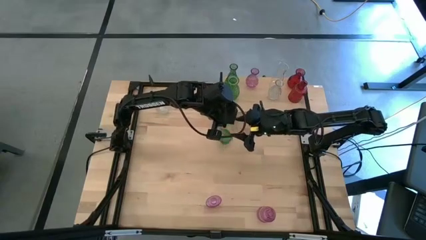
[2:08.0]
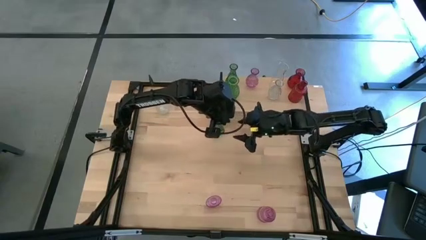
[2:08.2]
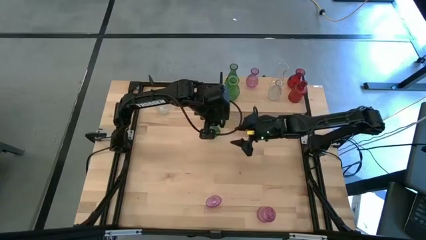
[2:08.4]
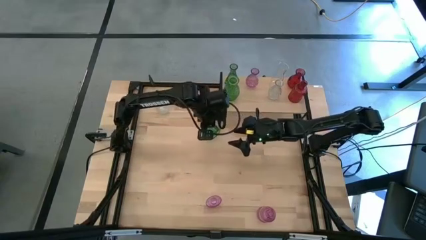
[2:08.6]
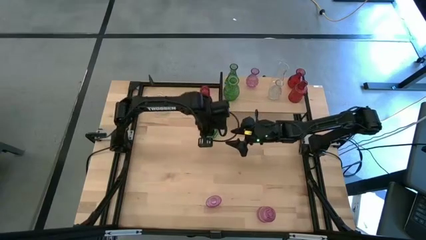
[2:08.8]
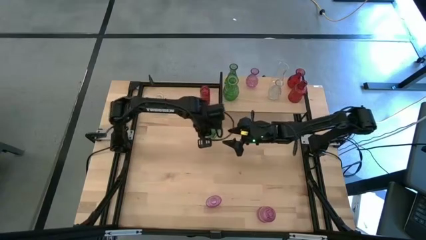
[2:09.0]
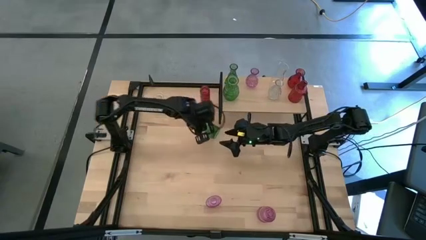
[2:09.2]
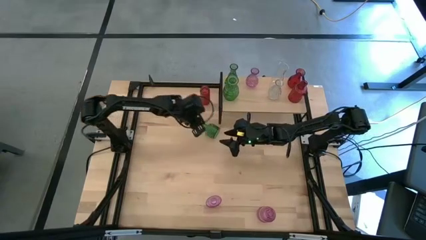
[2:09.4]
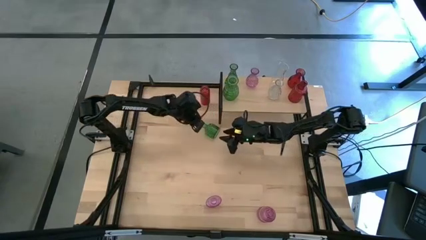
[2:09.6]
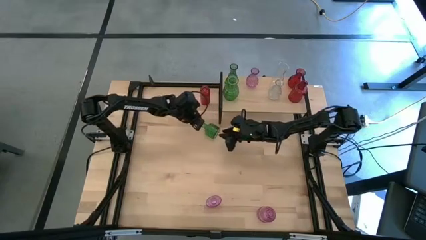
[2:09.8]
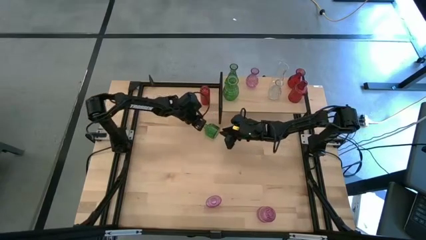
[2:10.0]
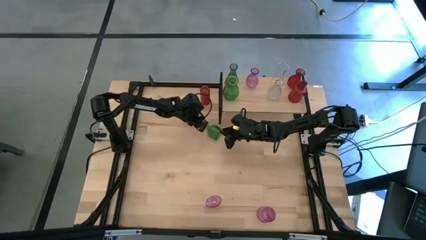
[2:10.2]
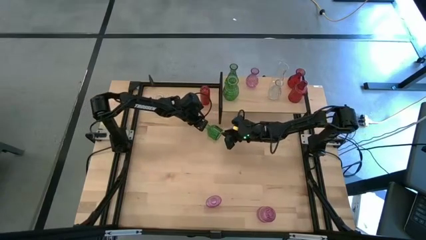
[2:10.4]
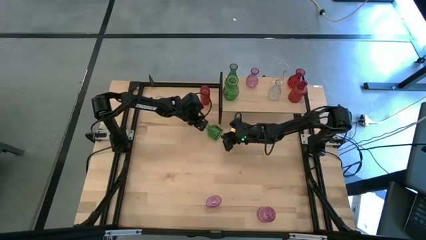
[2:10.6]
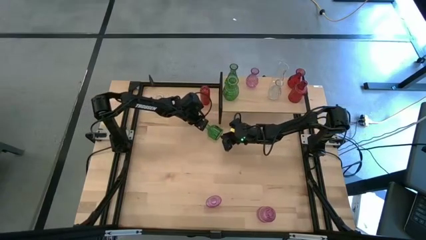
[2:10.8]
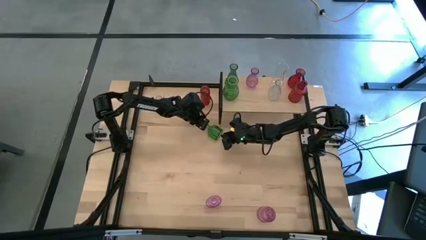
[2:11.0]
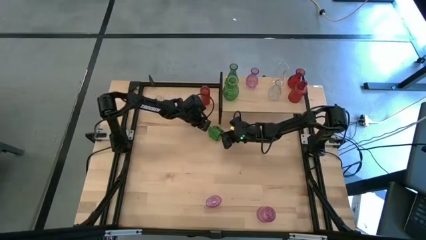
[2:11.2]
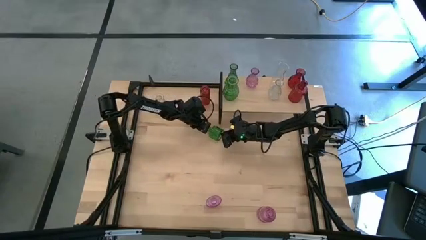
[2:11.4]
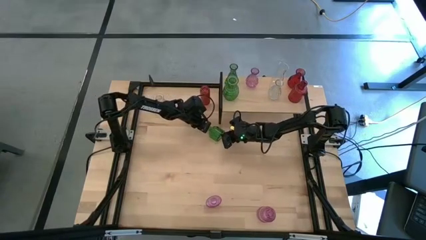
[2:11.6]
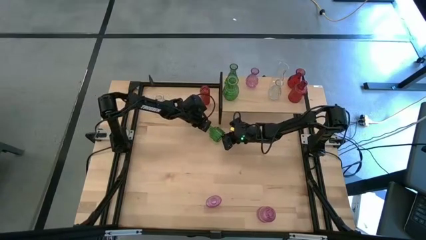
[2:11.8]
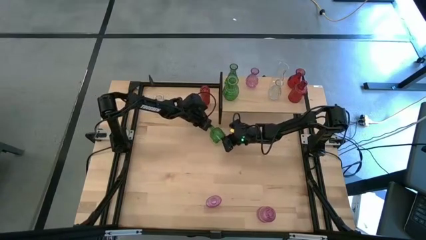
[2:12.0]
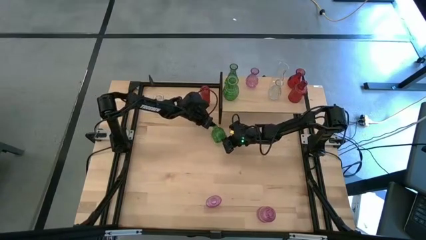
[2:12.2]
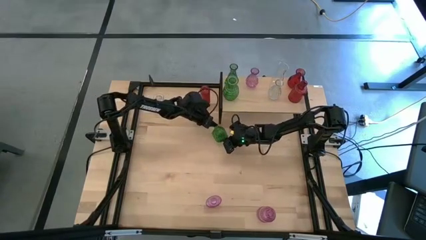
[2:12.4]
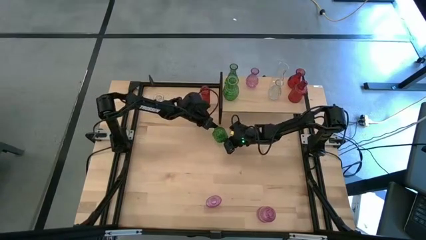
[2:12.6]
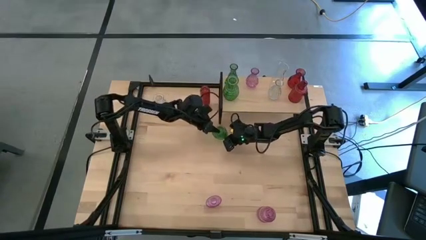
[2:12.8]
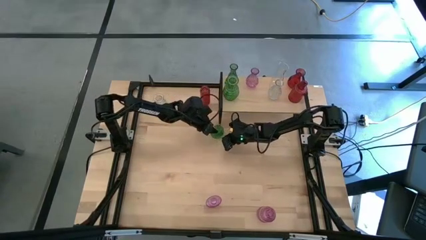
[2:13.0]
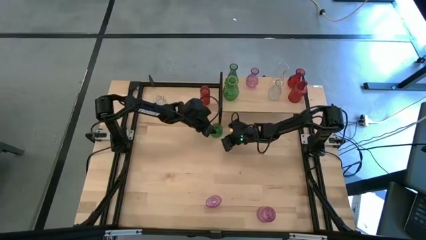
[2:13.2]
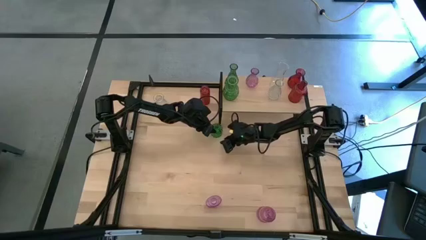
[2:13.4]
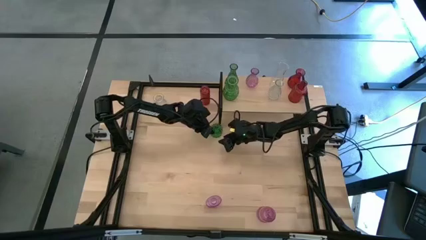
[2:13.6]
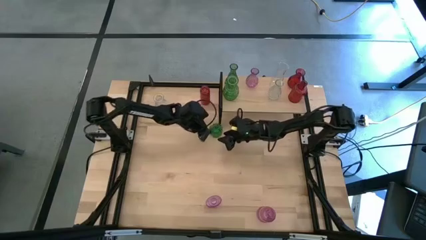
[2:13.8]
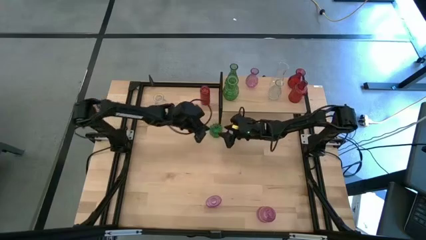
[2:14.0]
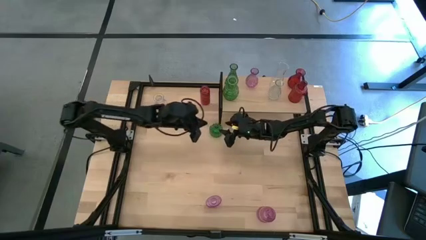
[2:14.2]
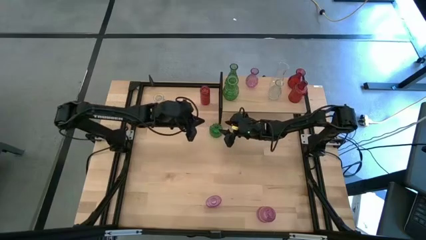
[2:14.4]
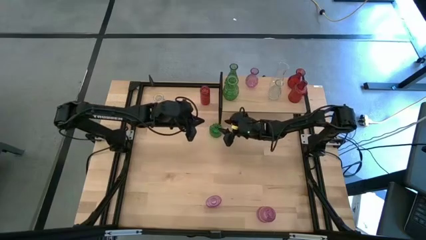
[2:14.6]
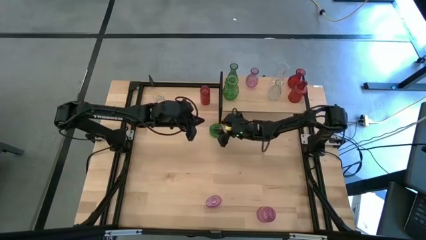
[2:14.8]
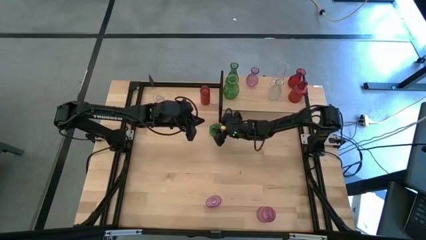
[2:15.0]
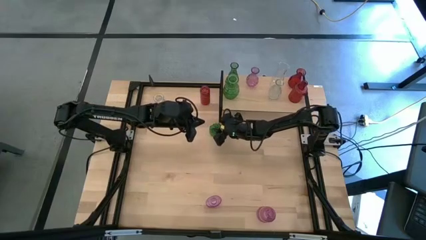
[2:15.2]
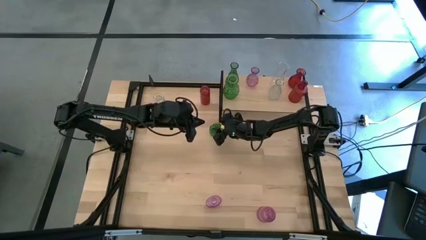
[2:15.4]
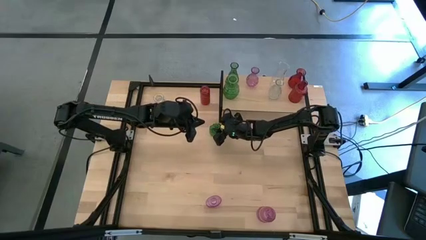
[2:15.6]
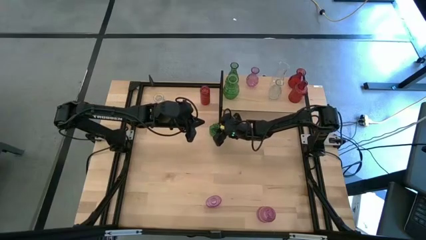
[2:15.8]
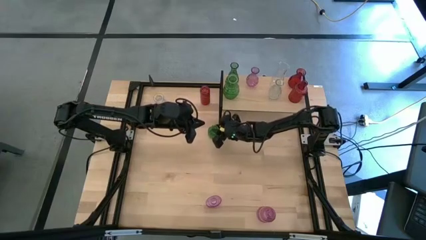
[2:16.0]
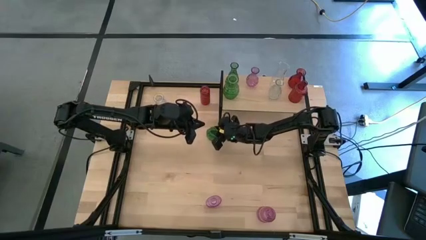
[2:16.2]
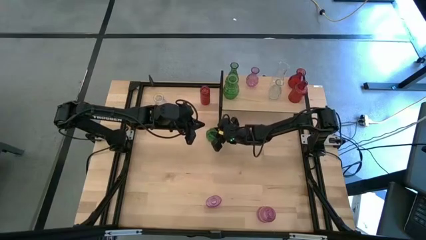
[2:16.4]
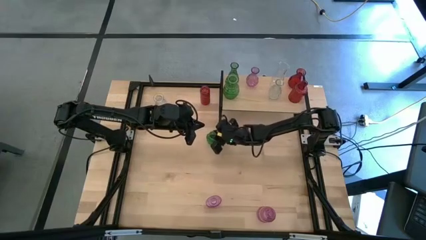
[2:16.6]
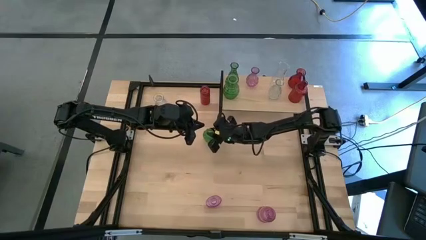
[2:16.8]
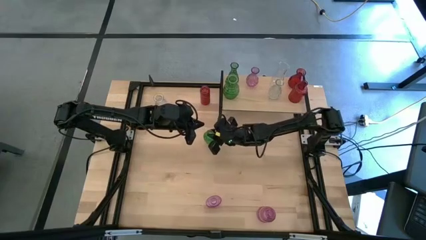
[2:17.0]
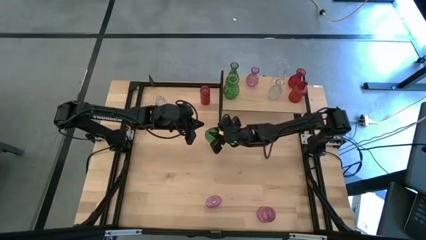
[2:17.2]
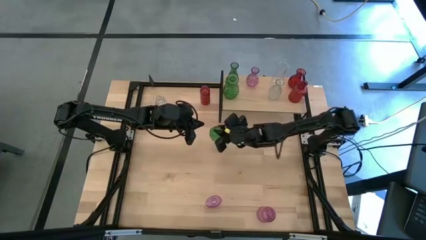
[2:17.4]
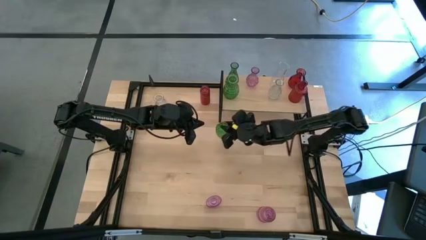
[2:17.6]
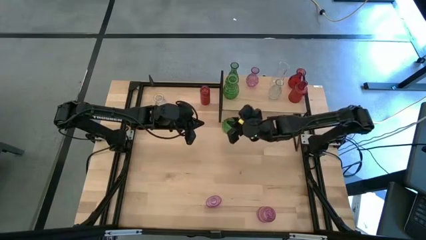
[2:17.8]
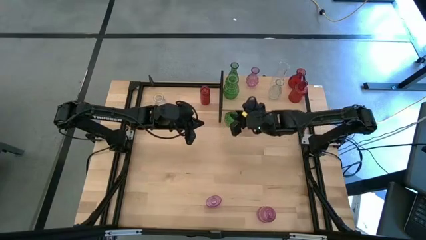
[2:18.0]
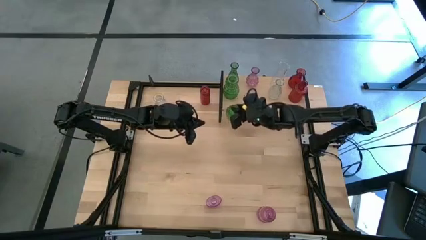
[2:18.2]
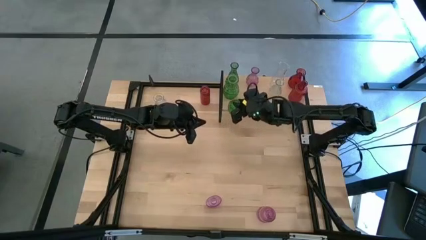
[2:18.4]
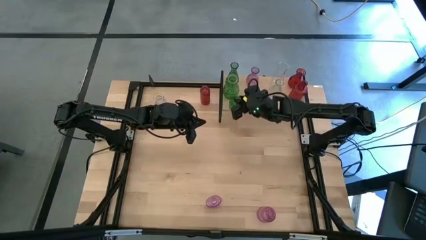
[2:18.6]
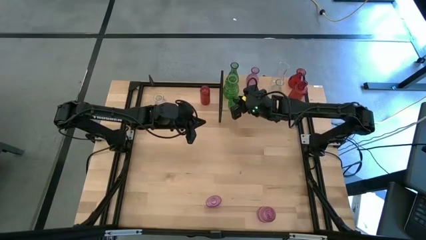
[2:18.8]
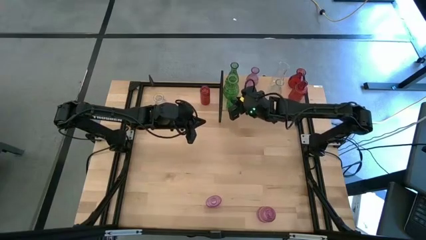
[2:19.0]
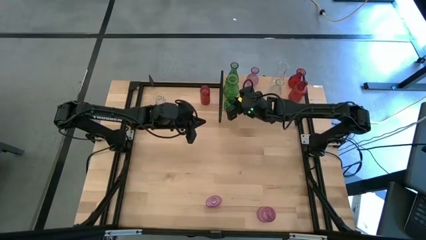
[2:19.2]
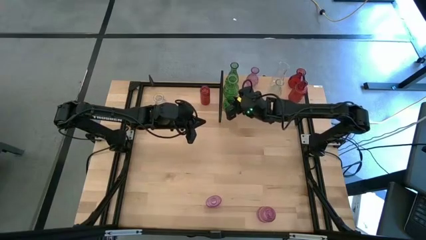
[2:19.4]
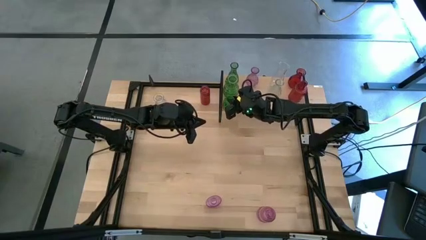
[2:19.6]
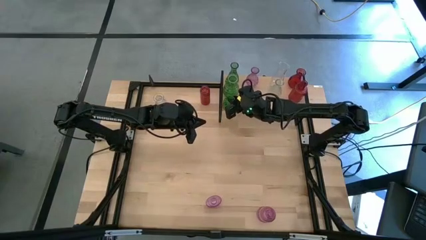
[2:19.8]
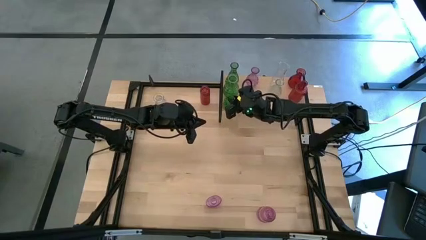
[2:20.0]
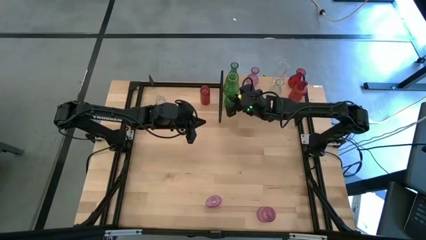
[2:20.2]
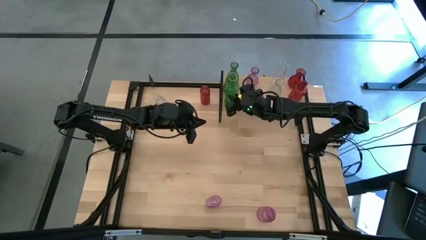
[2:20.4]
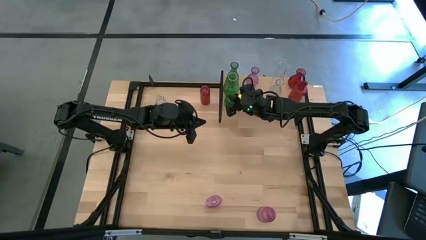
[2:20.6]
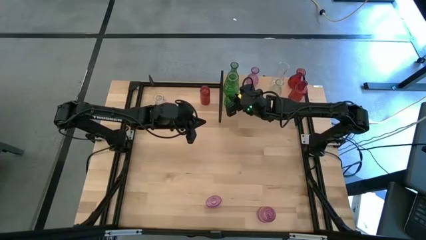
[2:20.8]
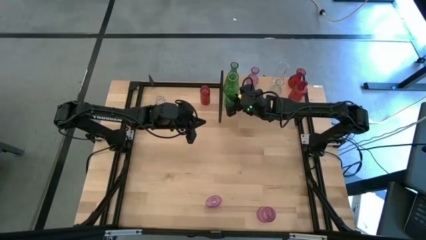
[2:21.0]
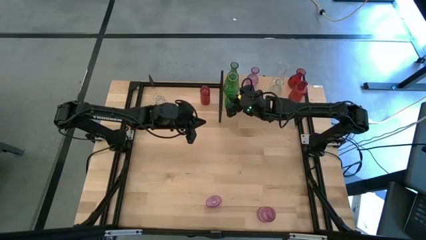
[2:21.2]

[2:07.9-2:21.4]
Task: sort vases onto shelf
Put the green vase on the shelf aligned with the other green vases

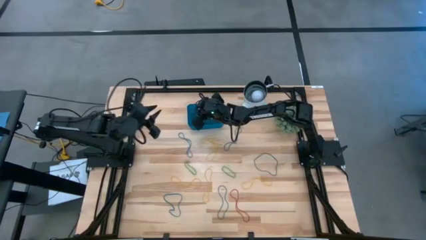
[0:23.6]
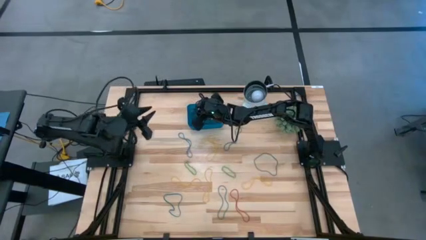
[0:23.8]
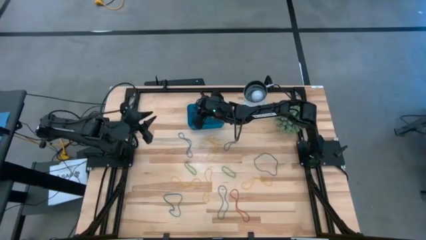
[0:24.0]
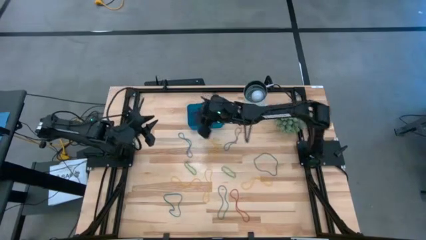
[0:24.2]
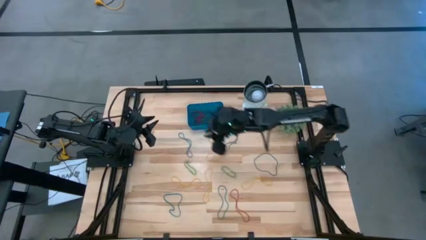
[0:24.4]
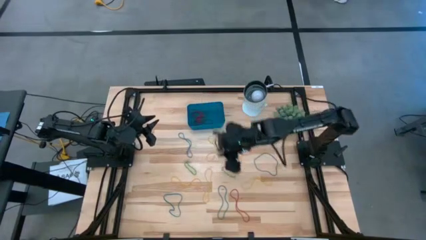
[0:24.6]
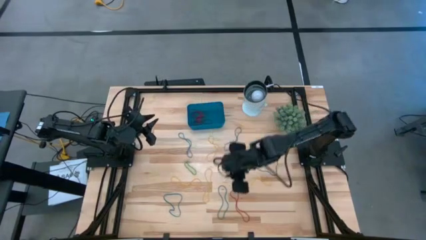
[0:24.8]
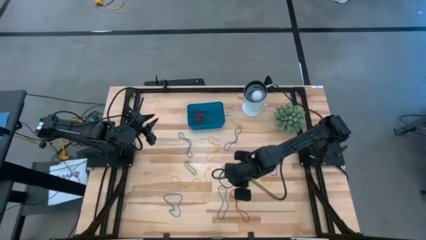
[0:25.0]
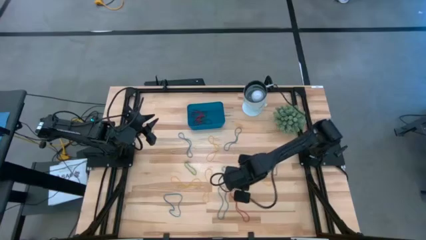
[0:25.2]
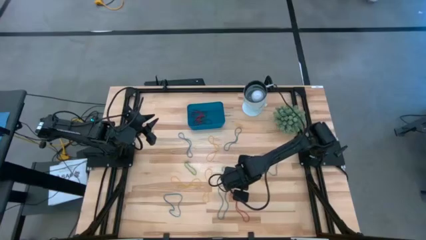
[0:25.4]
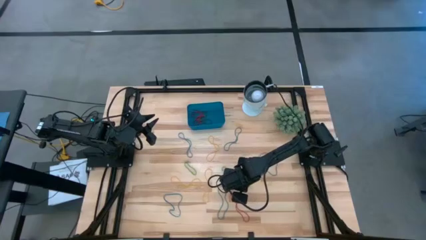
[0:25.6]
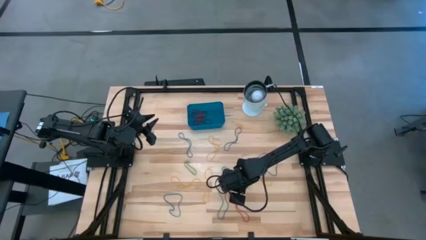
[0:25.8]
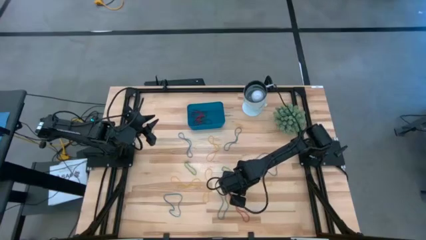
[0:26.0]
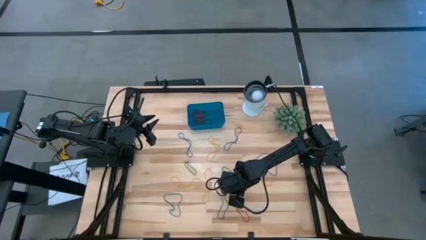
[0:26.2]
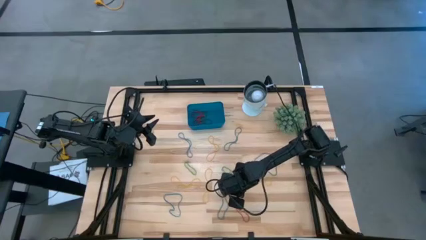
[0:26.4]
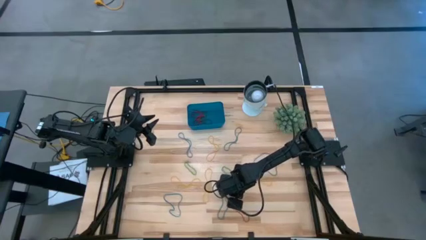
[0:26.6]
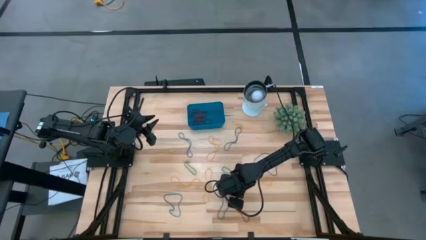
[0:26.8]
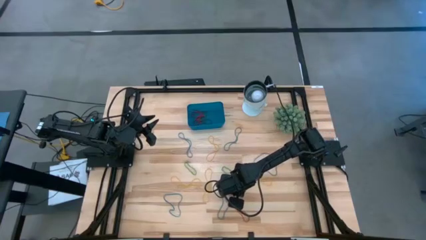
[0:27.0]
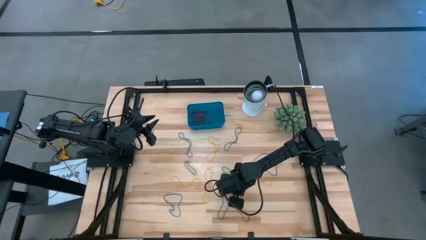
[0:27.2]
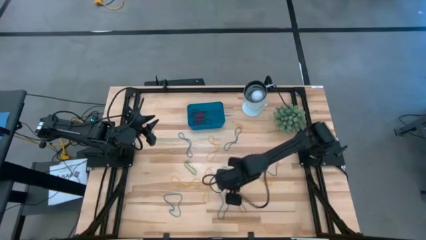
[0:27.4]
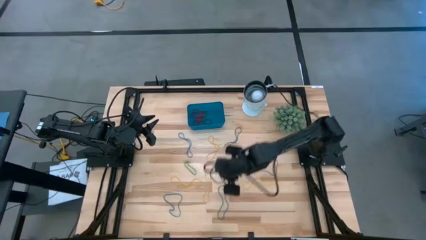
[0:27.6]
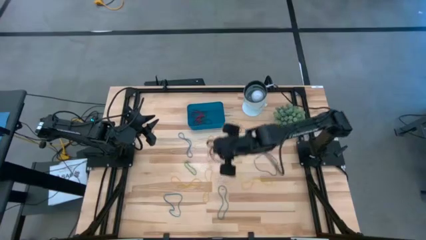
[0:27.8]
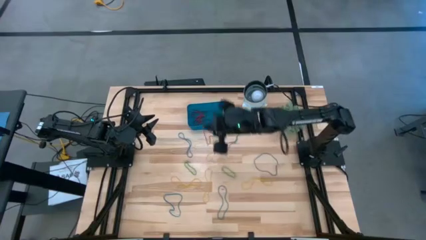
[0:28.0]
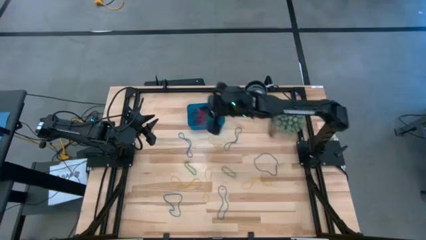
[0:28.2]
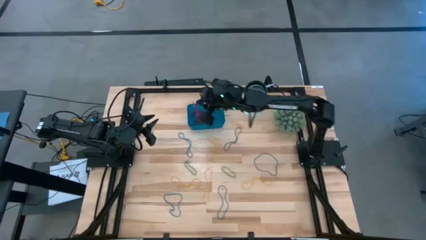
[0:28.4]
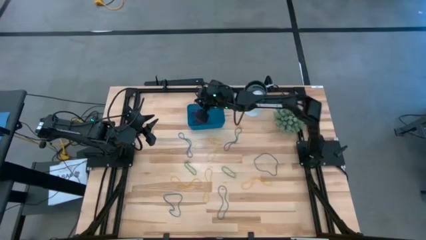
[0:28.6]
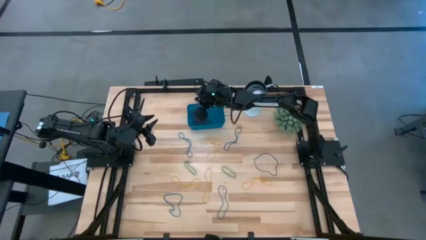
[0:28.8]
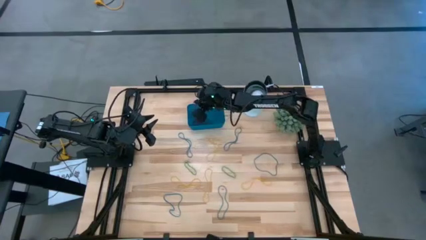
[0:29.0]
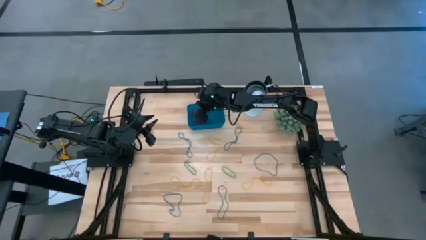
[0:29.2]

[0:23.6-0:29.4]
Task: Pick and place items into bin
Put the red rubber band into the blue bin
